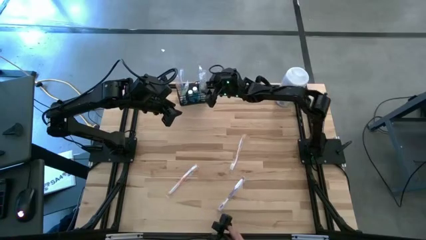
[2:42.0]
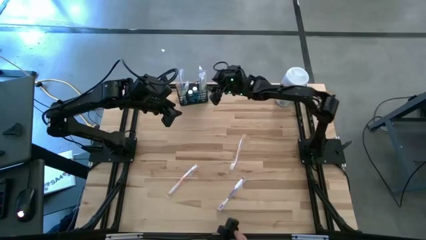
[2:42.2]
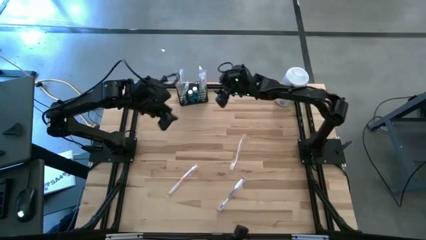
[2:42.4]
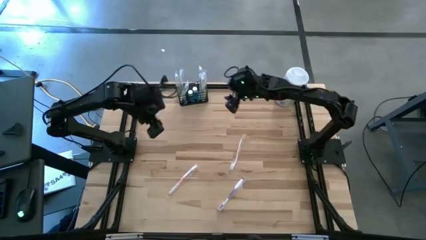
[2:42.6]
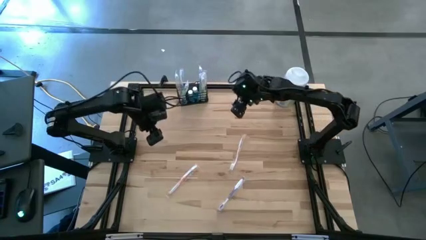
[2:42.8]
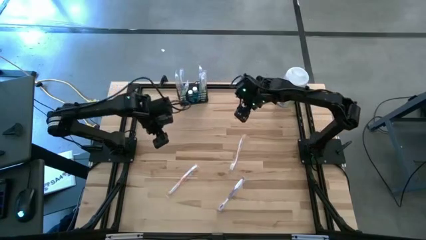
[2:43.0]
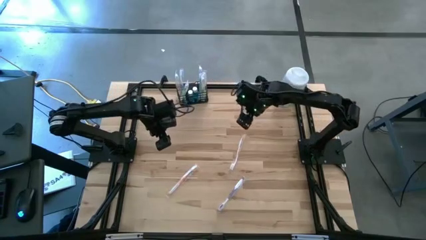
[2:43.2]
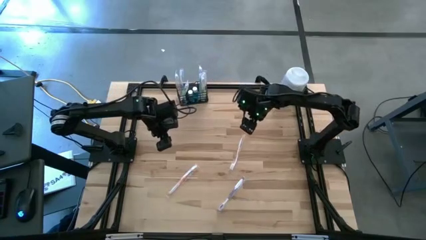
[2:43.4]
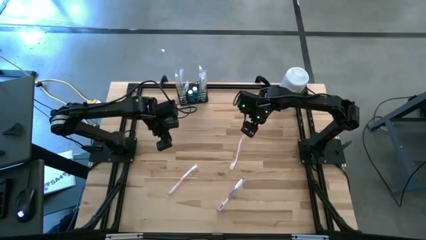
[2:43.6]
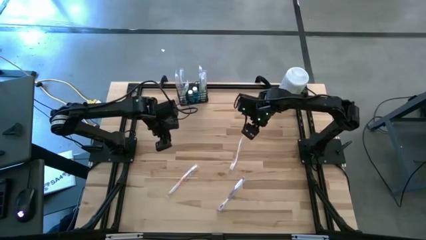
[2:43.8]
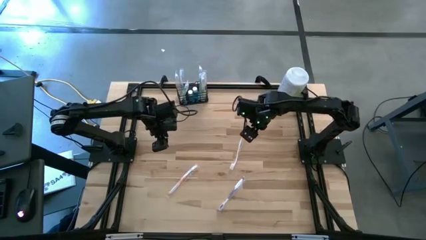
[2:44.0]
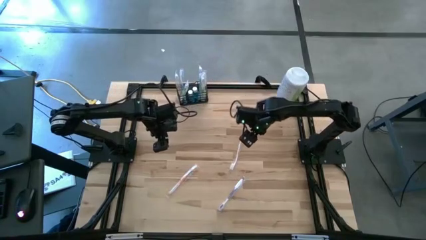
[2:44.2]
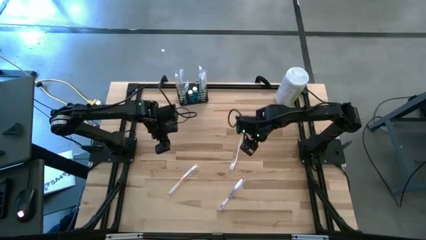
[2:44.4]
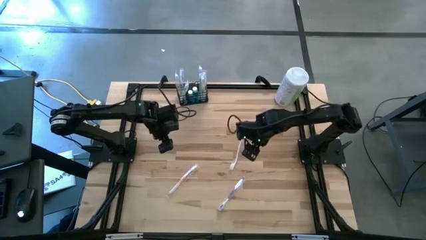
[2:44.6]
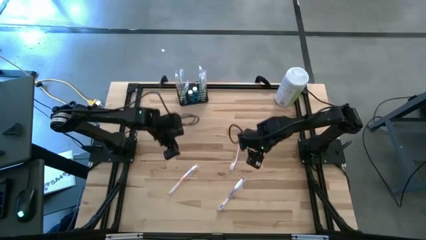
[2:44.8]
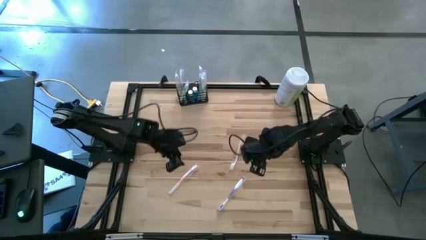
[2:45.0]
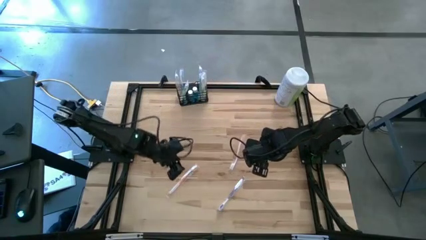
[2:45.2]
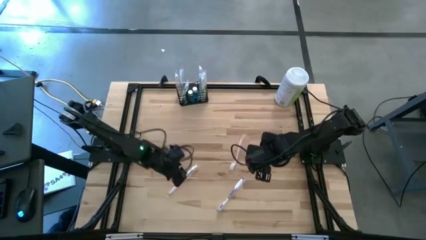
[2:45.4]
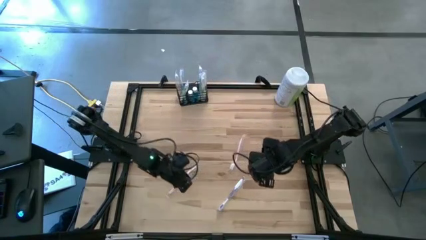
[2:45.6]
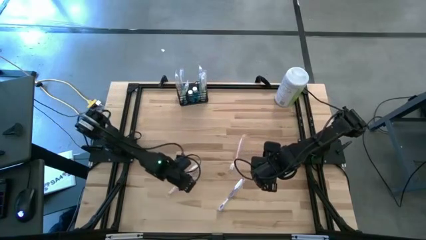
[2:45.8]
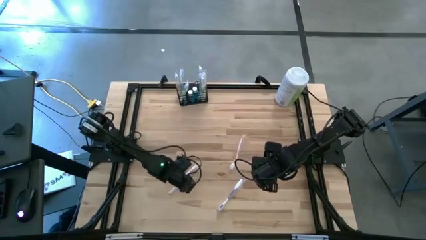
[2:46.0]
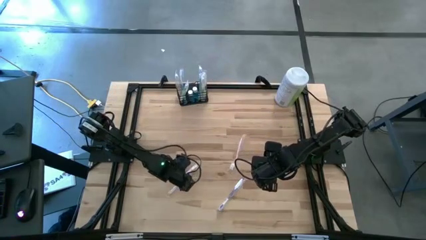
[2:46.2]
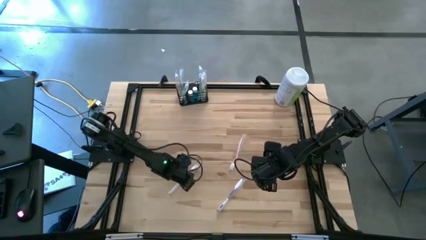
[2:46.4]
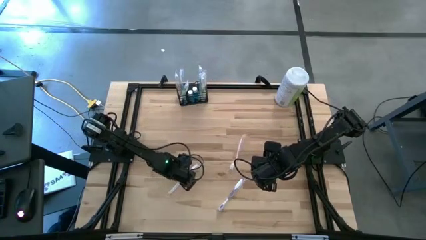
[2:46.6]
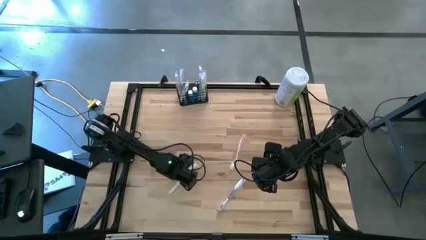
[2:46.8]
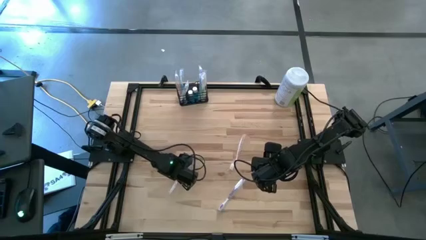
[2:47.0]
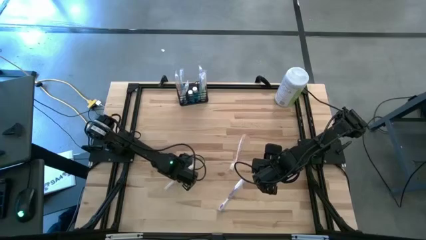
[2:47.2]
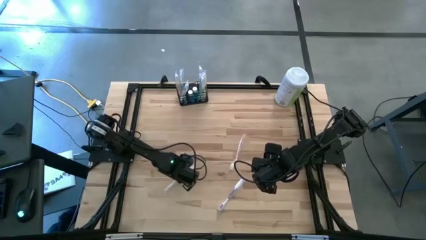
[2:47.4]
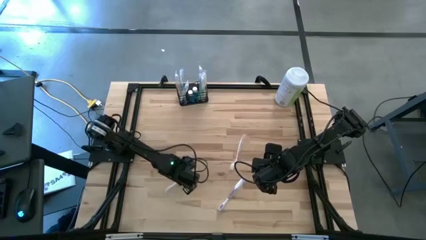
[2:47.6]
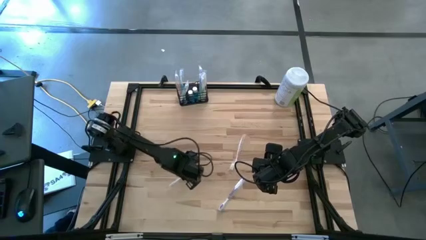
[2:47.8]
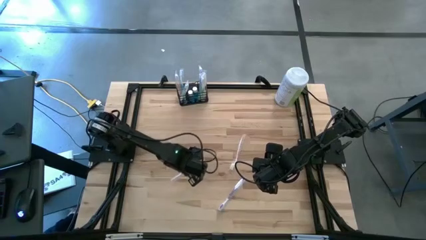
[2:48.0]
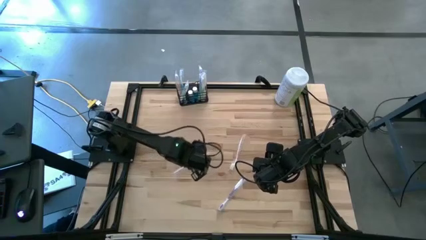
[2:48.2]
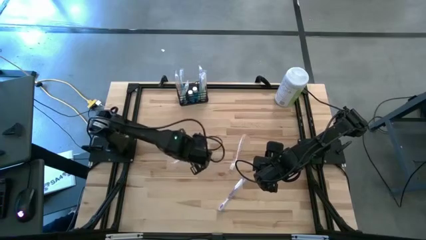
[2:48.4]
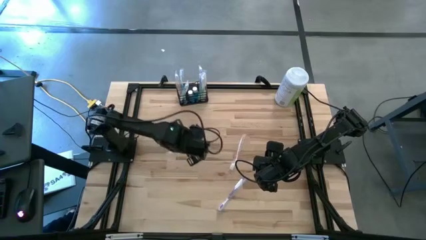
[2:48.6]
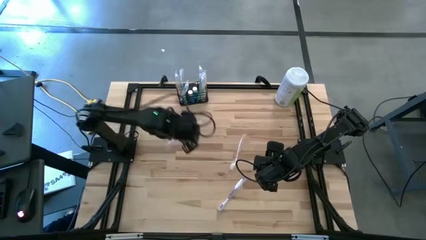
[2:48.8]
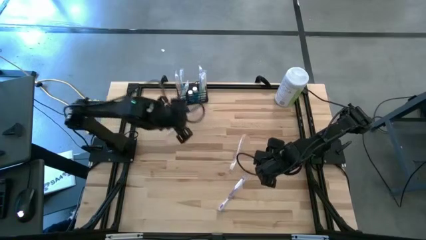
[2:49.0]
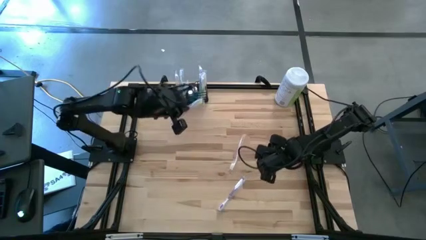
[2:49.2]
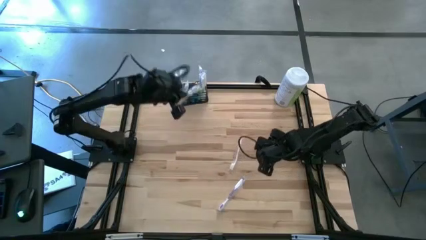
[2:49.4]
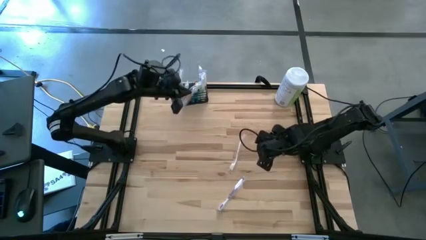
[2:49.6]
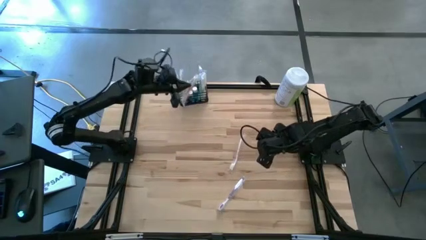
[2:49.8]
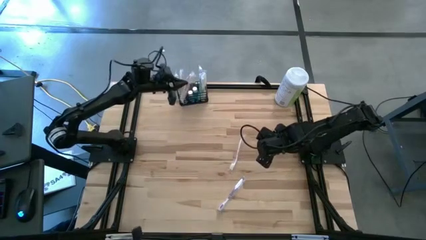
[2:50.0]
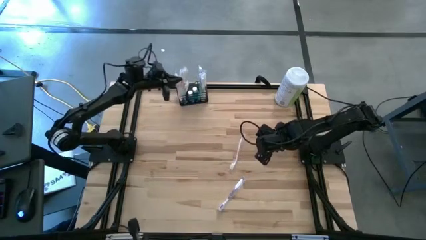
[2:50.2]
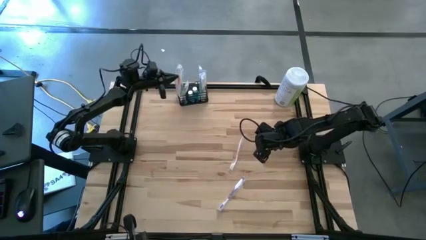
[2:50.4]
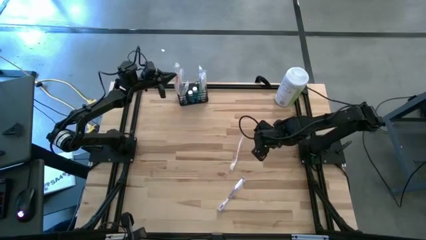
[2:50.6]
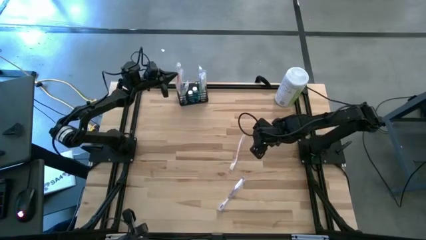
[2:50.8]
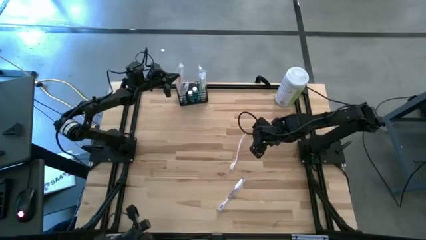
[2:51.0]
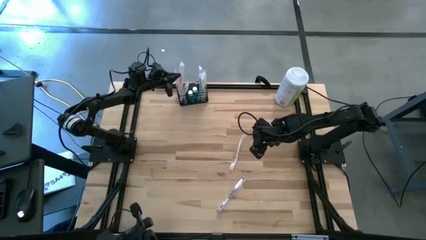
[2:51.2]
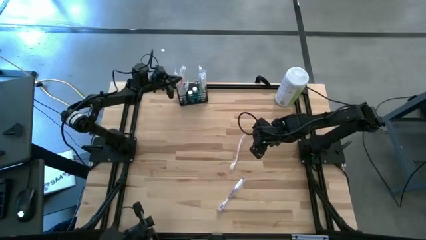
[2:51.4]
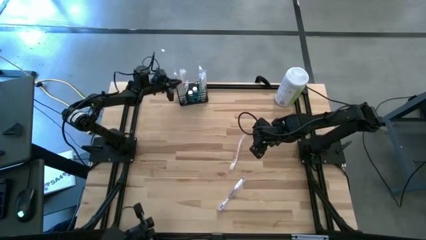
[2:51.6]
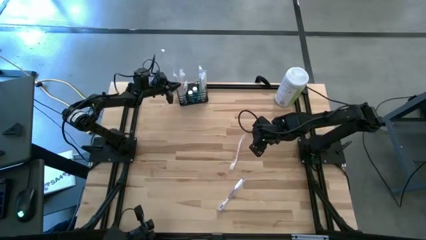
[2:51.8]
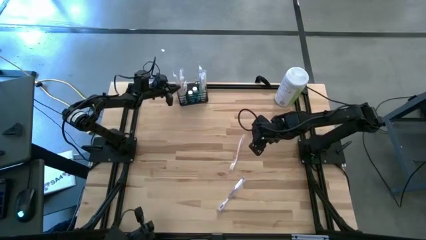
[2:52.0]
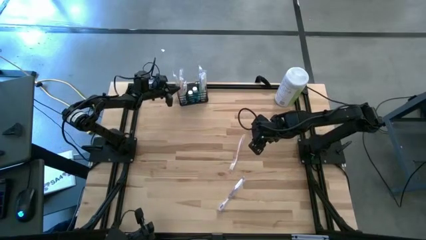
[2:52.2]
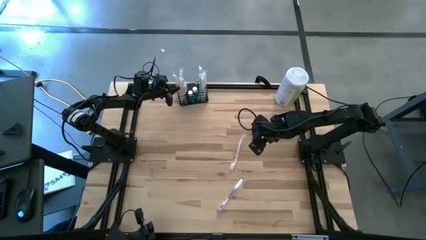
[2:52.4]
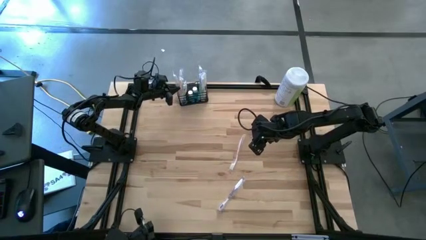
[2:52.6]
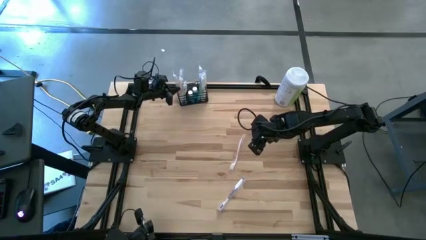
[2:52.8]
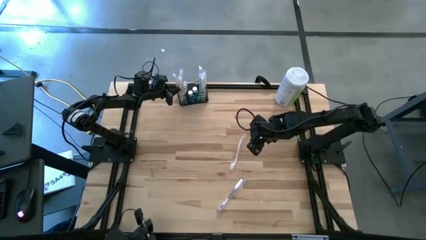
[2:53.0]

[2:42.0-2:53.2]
Task: Pick & Place toothbrushing station
Put the left orange toothbrush into the black wire organizer

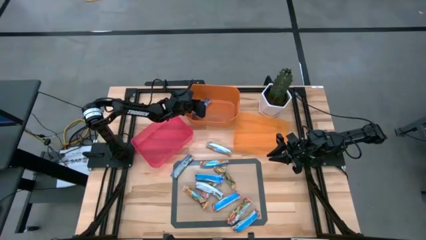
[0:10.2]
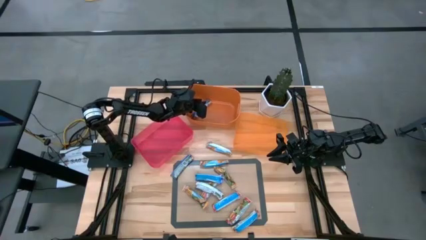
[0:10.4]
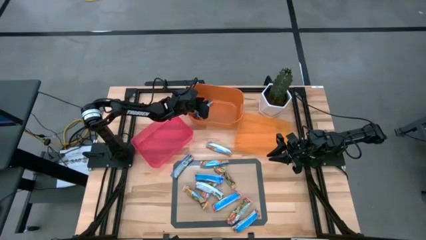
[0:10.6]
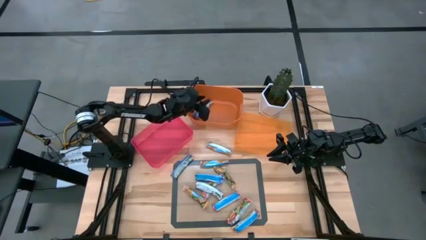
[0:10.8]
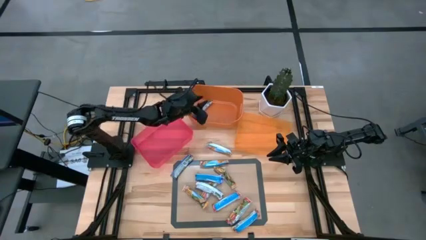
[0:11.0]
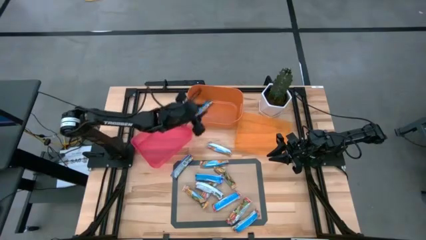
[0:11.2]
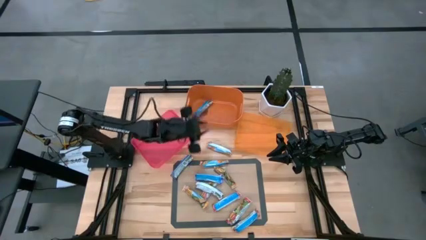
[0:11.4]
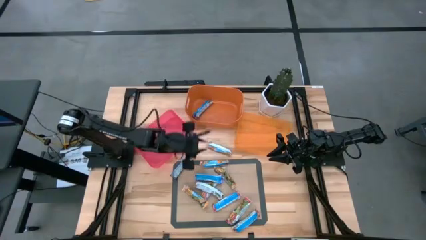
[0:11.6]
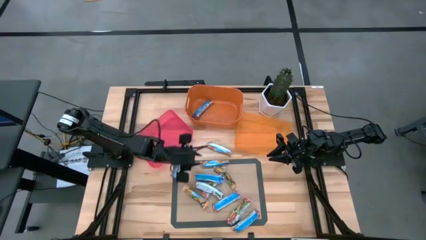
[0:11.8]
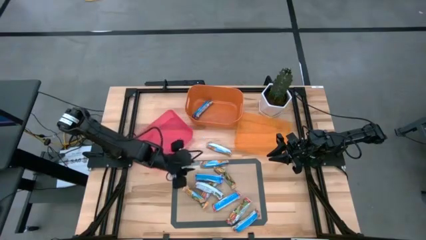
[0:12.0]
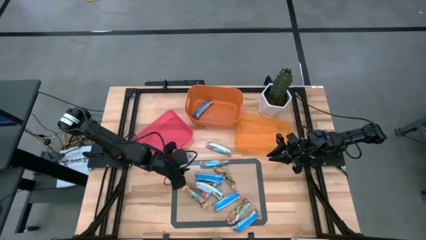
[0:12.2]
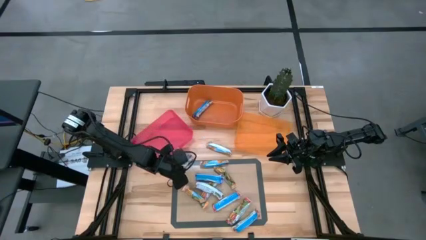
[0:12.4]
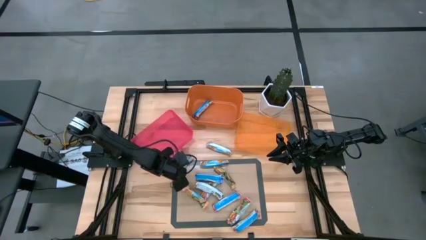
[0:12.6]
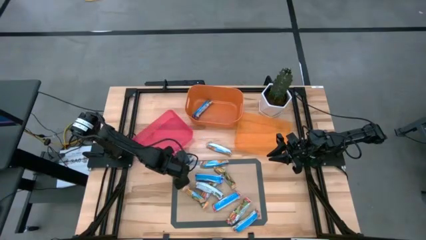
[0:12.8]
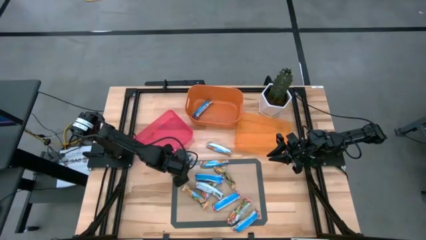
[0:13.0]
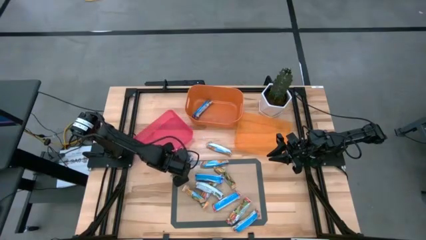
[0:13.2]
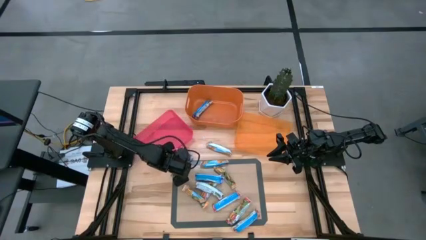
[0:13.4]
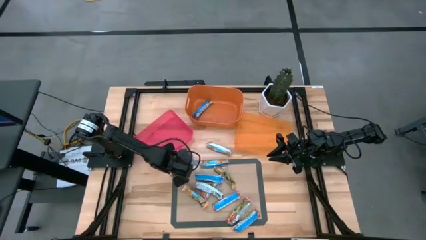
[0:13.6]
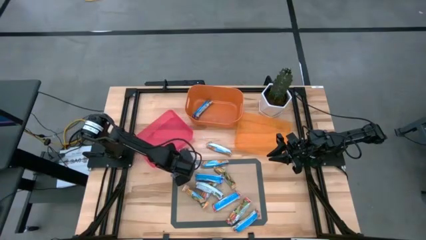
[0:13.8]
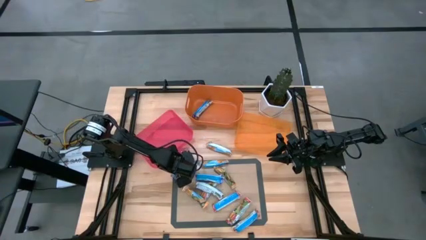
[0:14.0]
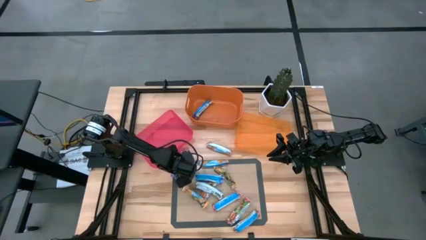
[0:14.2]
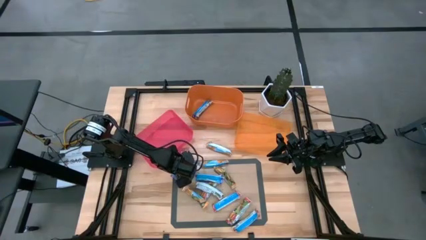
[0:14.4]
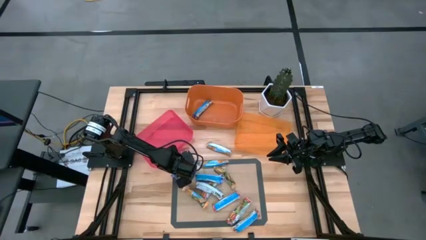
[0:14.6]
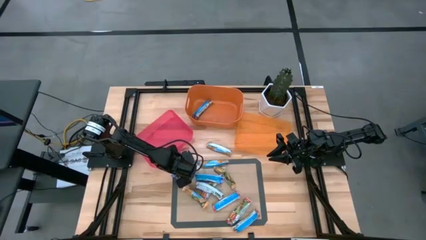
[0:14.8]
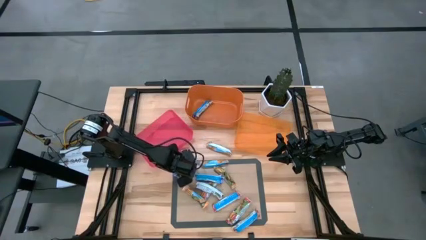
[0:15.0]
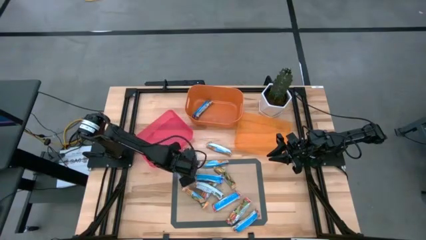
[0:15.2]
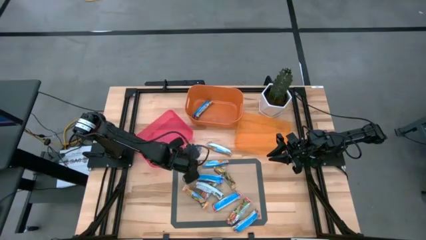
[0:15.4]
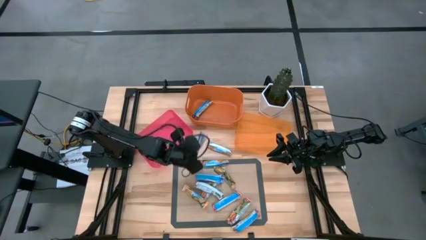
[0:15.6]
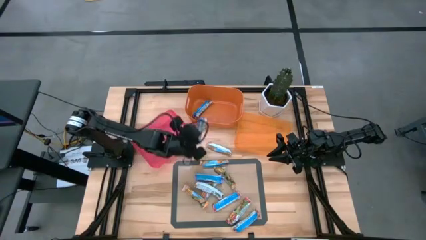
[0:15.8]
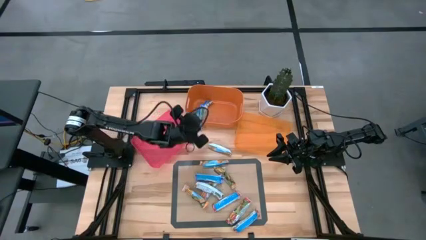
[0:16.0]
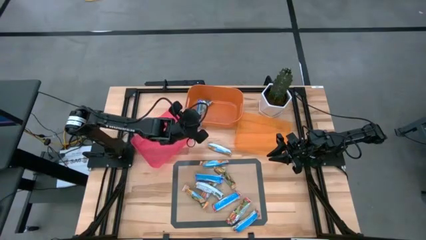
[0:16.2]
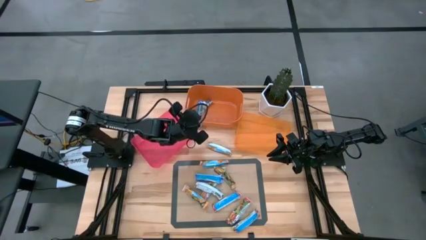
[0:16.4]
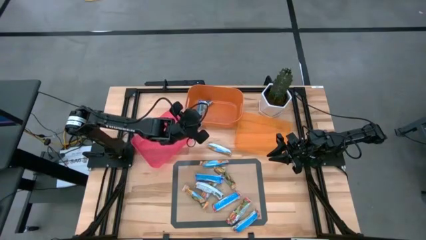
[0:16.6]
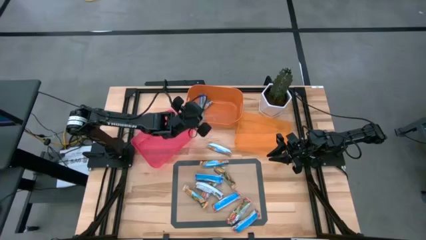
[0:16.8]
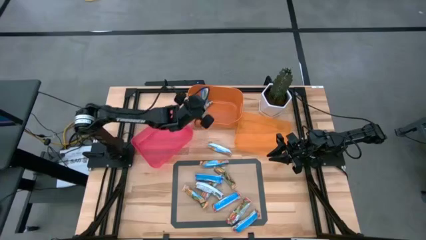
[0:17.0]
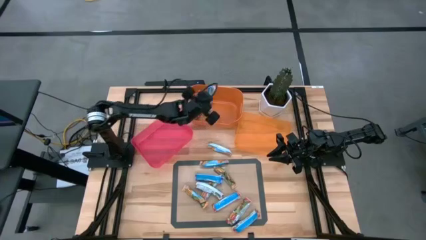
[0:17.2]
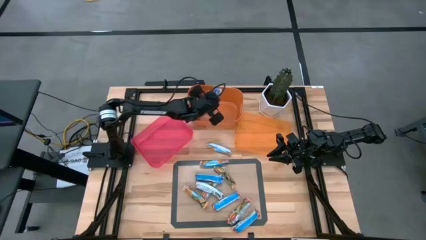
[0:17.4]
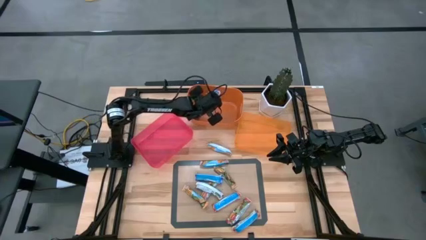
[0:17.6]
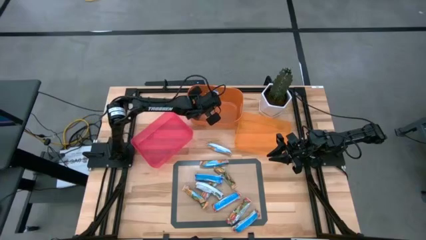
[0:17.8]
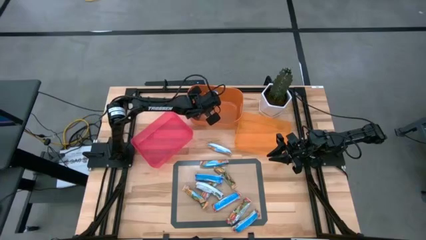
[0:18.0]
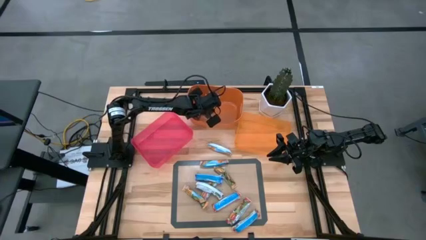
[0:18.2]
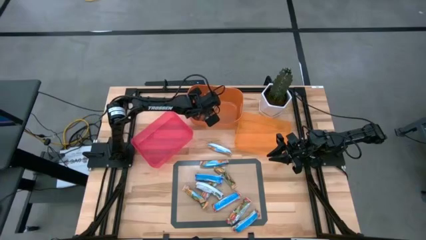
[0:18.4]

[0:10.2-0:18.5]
Task: Pick and place Granola Bars by type
Put the top blue granola bar into the orange bin
